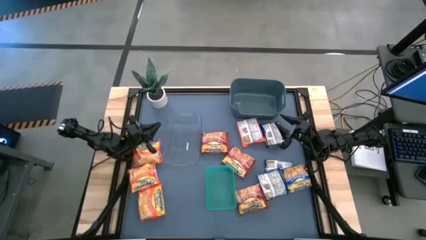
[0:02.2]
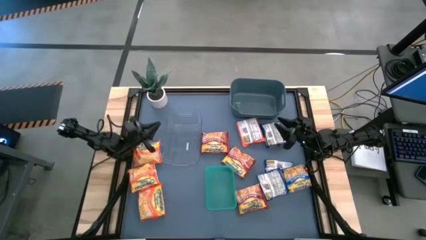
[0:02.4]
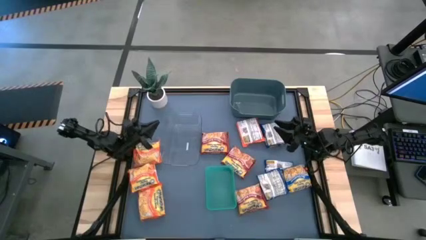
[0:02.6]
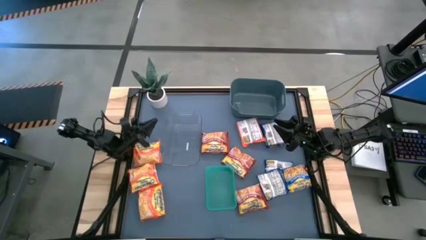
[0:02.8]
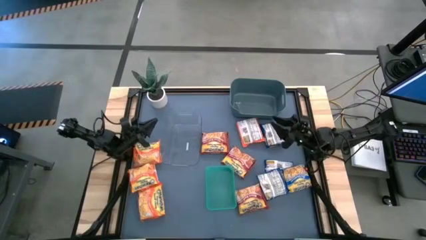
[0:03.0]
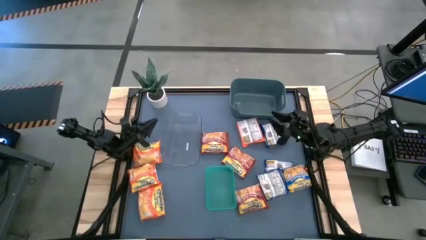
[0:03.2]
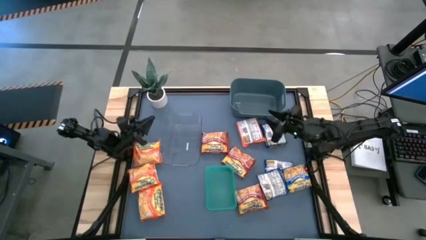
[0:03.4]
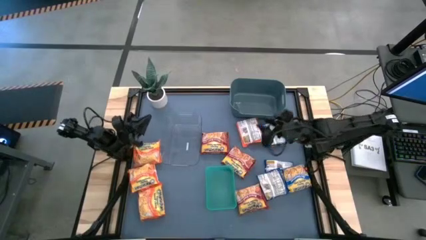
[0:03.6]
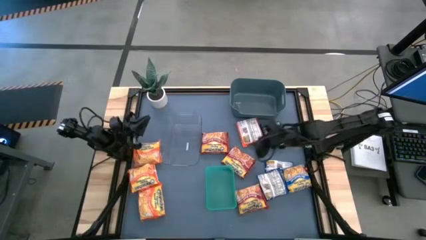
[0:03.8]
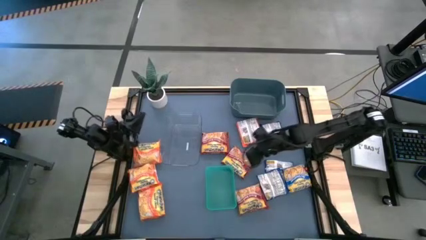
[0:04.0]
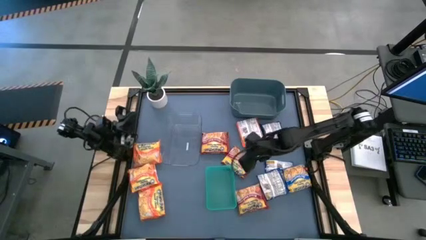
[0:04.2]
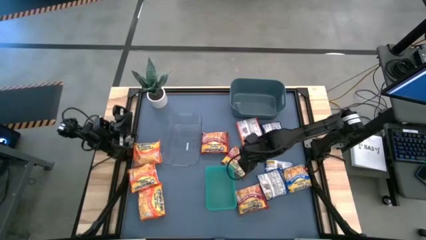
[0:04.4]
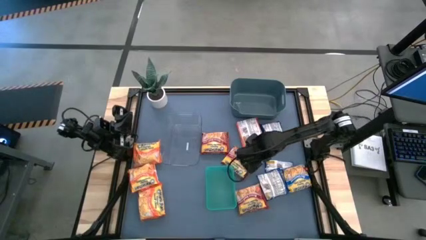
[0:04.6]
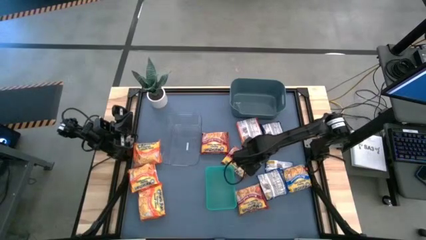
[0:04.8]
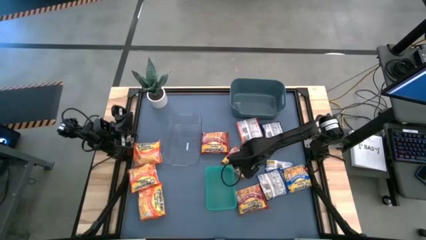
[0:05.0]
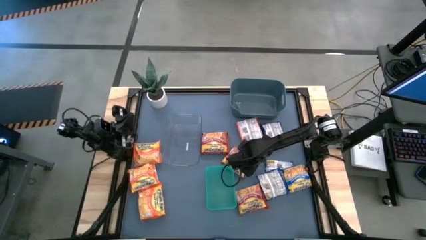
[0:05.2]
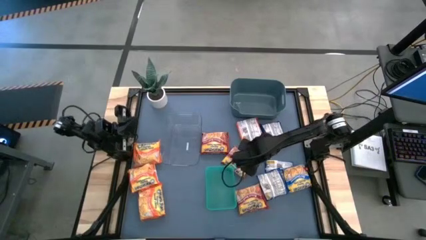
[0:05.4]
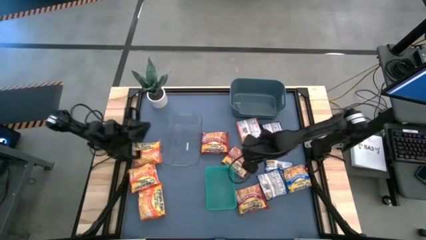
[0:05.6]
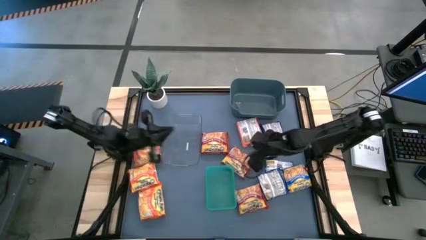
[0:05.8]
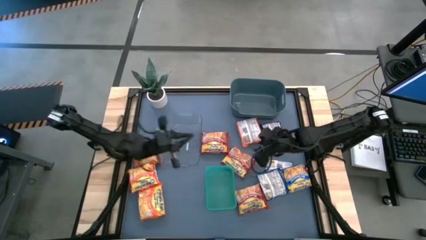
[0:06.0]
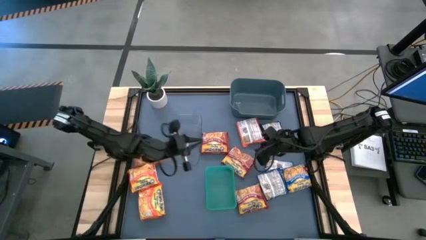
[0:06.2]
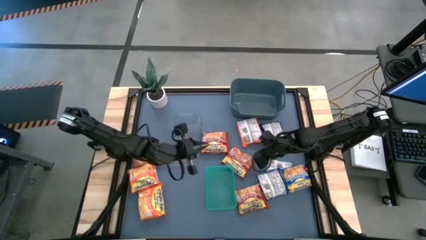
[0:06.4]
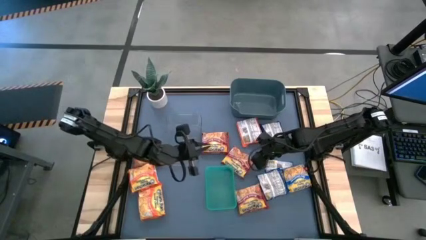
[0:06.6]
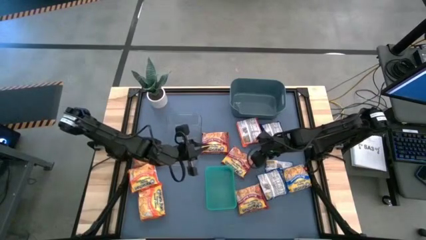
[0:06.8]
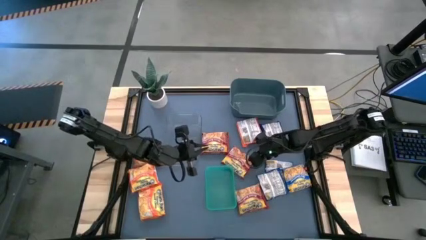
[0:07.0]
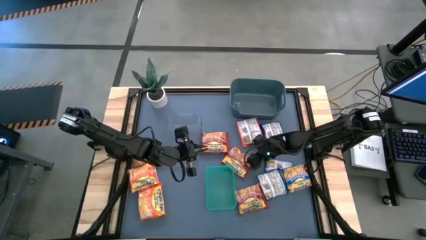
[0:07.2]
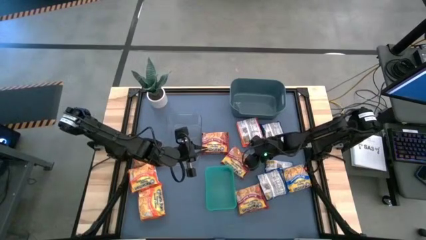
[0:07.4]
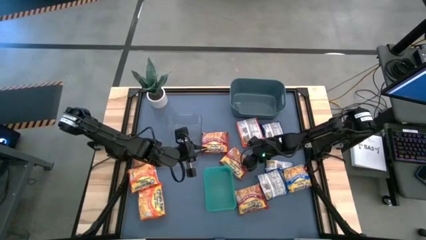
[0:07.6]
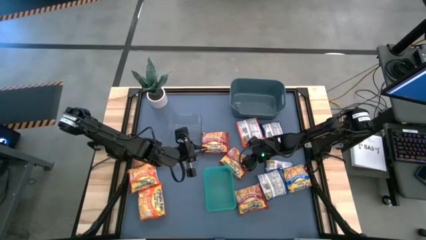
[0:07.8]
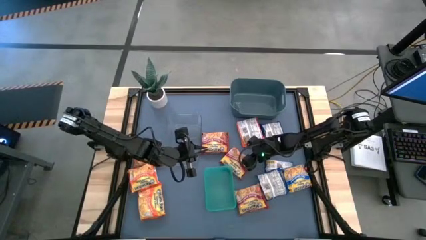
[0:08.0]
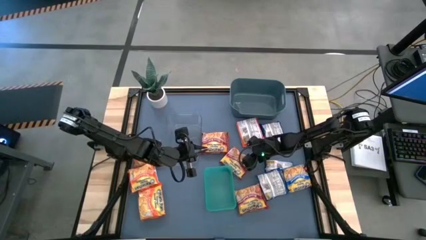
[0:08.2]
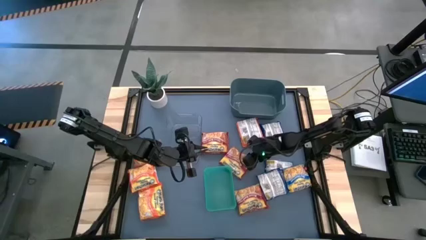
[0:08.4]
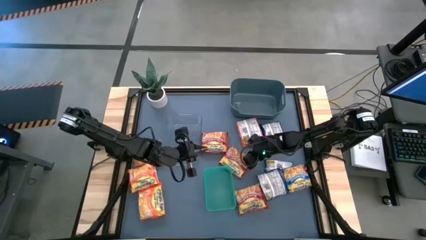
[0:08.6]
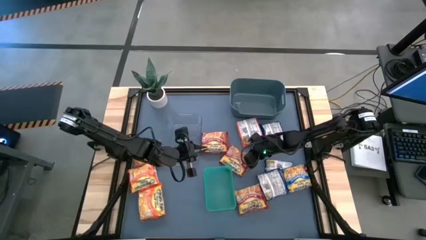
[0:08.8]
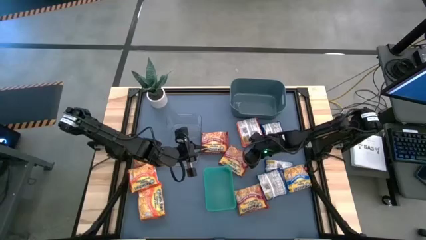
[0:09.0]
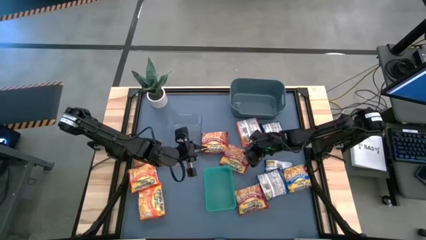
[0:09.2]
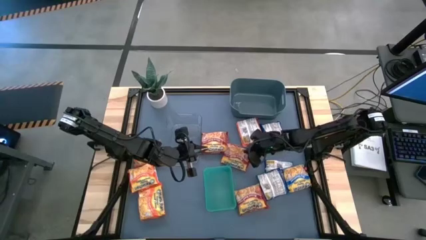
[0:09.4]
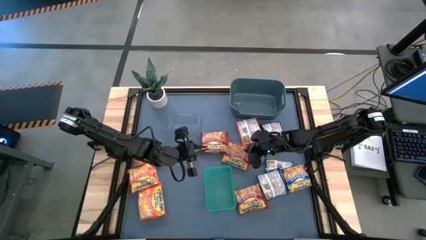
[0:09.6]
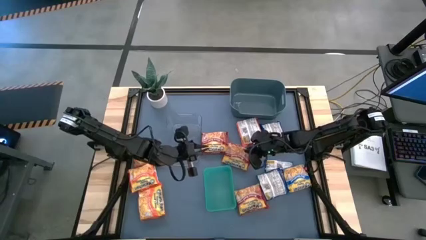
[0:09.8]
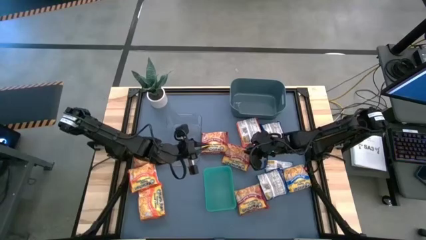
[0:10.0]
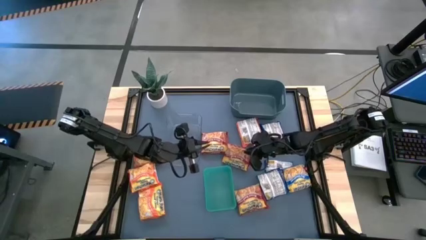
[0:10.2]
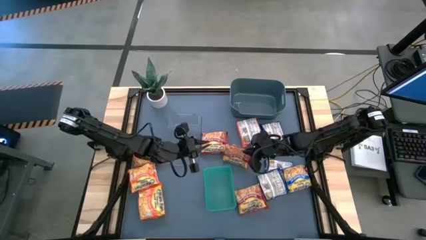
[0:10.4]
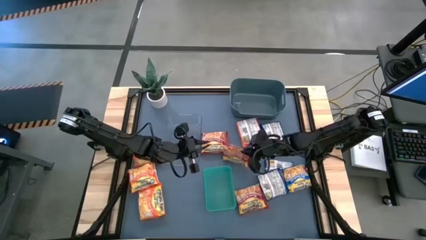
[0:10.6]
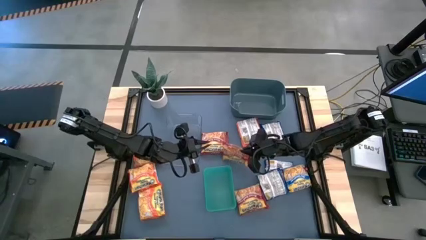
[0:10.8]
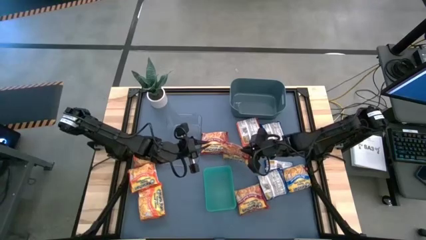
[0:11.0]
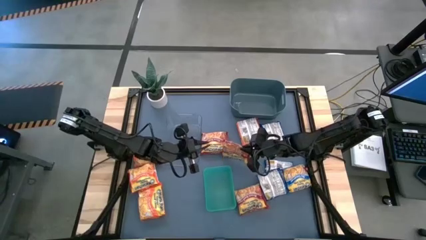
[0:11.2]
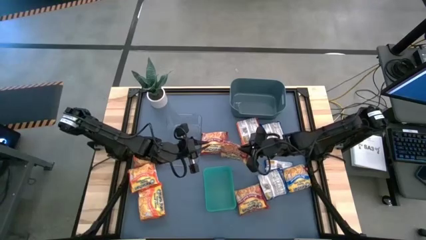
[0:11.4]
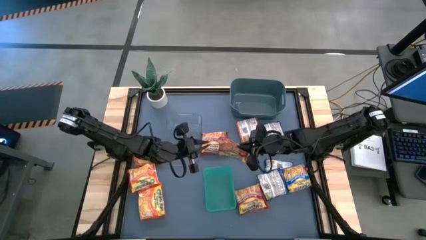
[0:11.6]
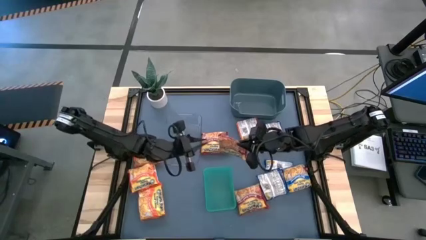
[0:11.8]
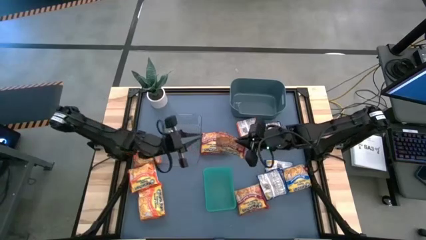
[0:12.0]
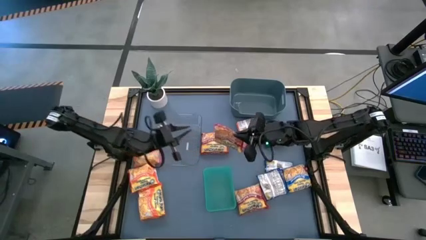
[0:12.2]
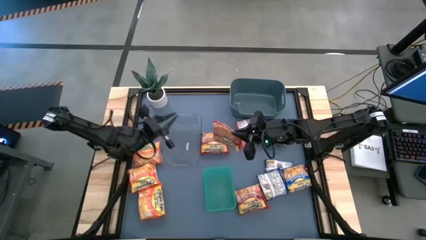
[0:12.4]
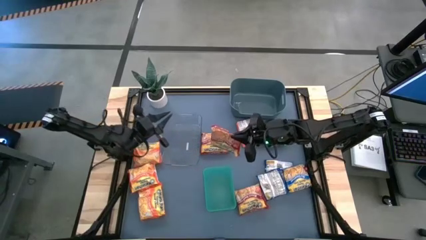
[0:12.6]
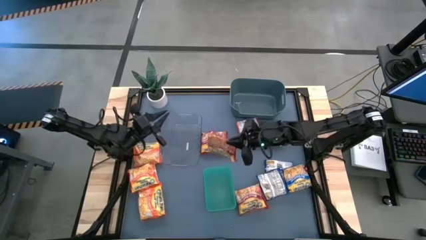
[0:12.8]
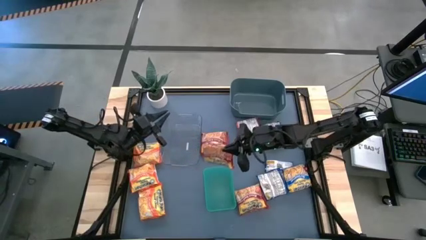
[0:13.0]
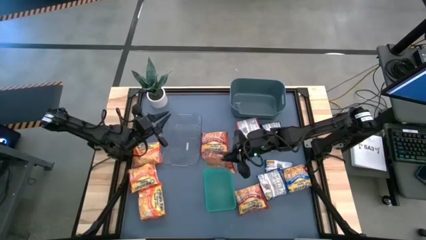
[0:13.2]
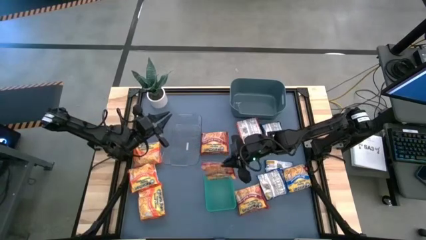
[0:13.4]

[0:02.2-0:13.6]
Task: Sort Maruchan noodles
Put the red noodle pack into the green bin
